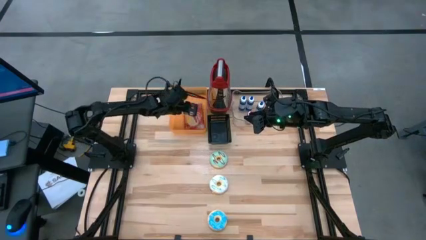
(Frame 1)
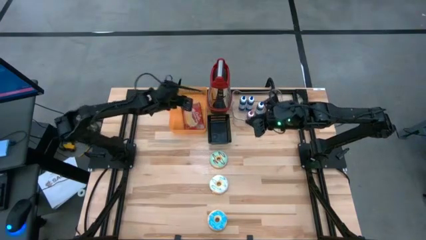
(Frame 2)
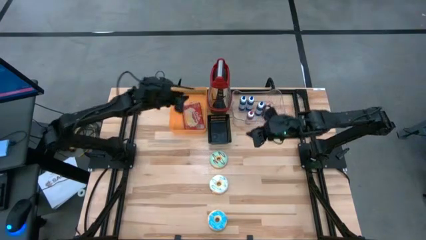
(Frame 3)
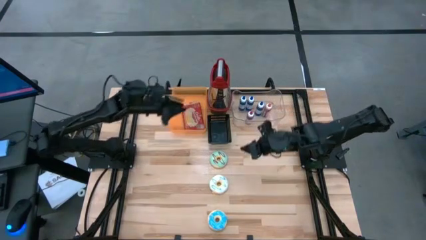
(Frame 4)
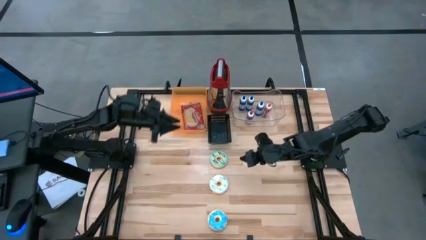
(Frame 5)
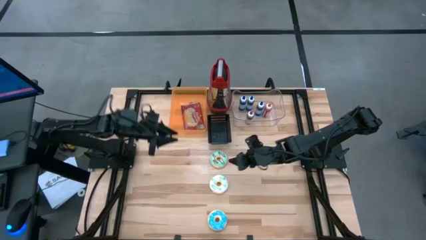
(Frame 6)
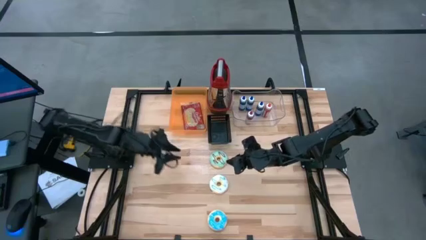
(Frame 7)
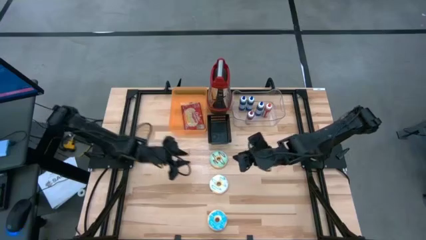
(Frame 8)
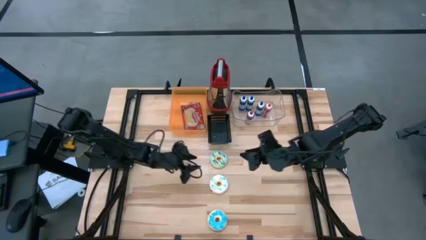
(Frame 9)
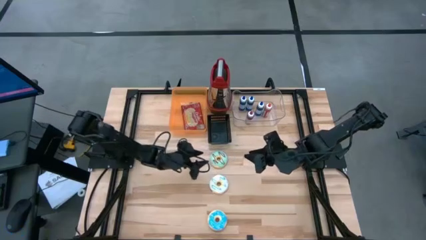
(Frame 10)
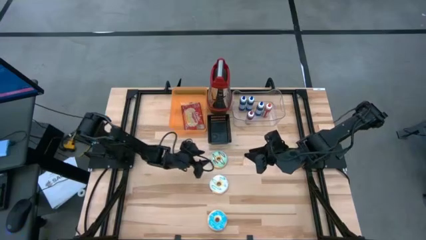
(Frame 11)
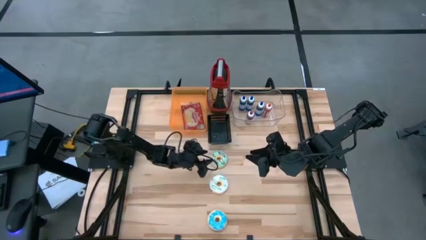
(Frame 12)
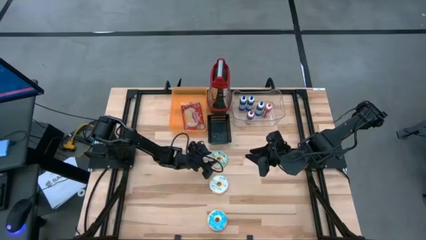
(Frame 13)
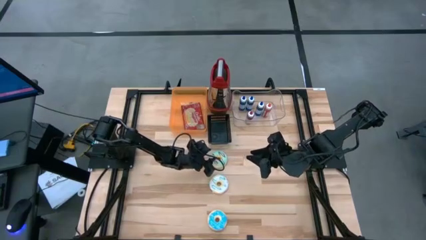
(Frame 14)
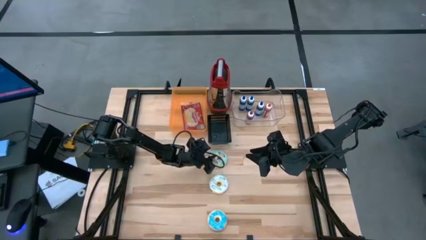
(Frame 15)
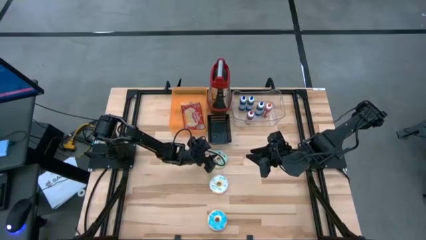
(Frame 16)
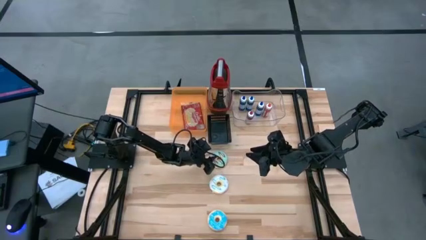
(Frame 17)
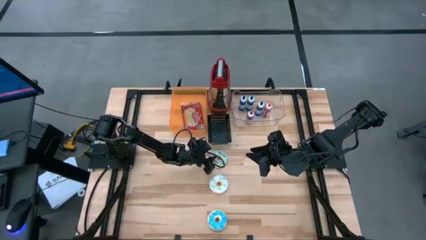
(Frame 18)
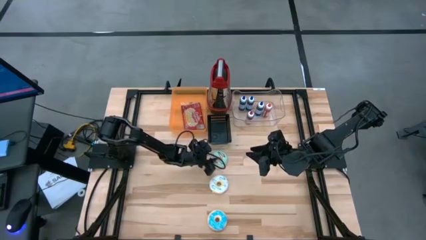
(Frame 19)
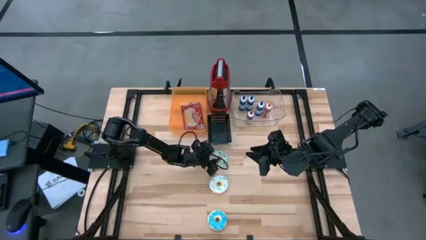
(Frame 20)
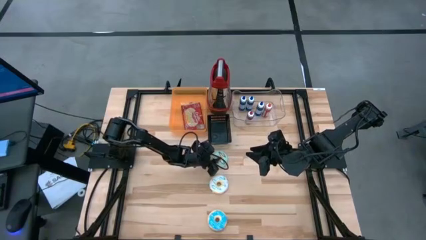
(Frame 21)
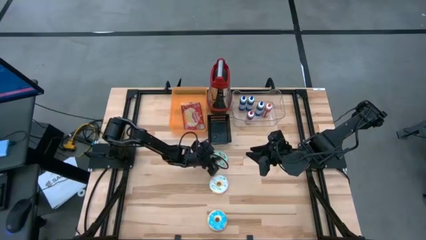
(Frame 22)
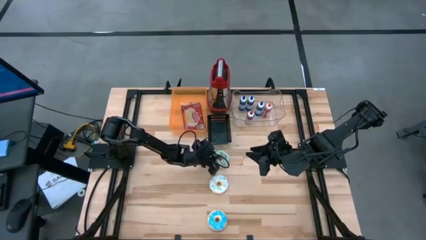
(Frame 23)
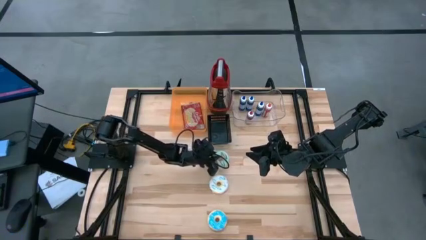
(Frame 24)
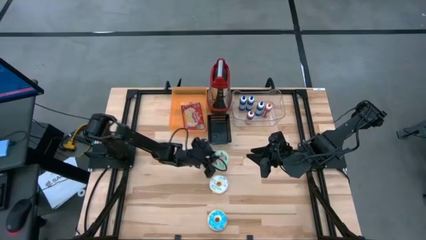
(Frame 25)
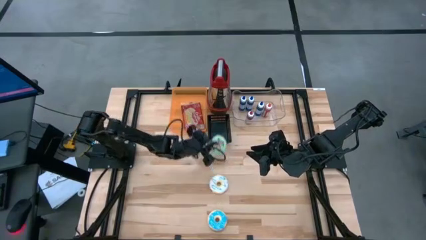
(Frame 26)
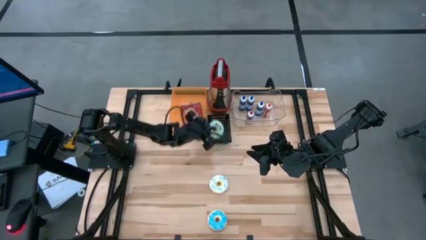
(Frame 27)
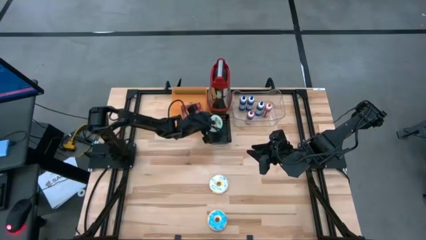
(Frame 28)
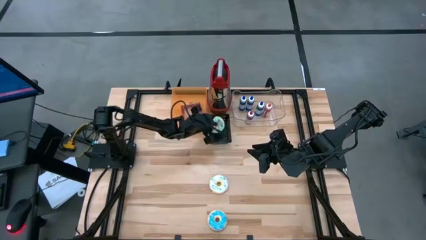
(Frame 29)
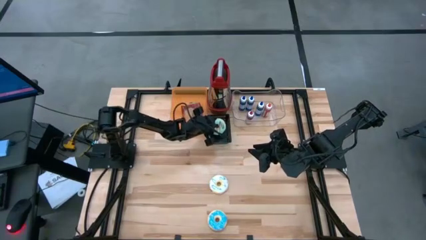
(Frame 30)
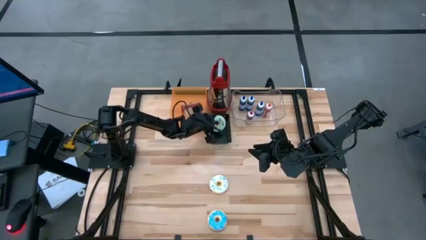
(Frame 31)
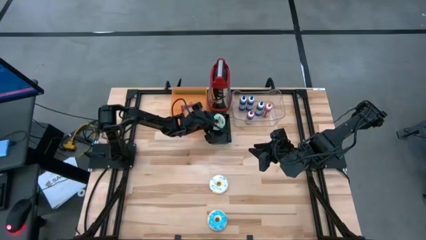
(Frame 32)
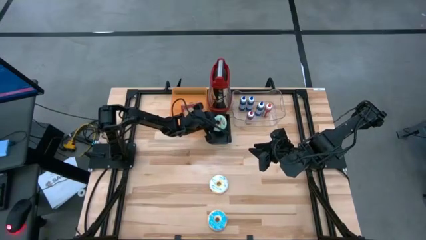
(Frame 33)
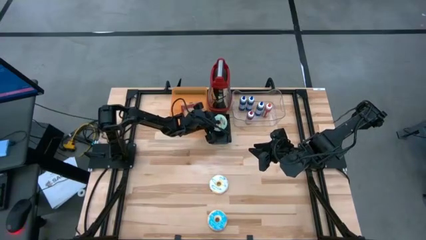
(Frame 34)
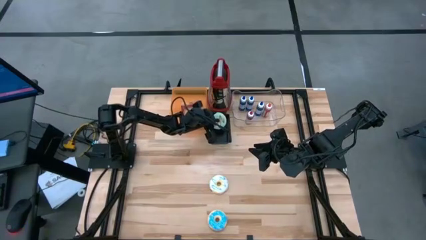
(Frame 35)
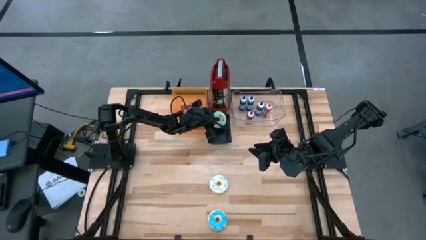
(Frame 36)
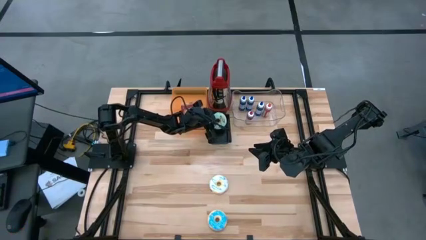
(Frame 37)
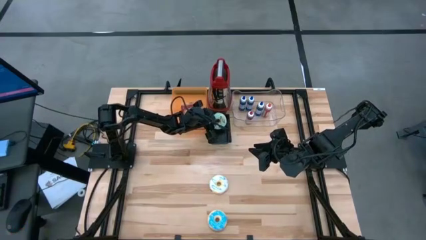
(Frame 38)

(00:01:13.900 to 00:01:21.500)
Put the light green donut into the black bin

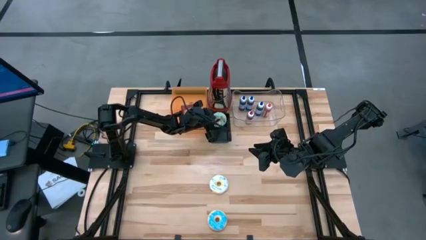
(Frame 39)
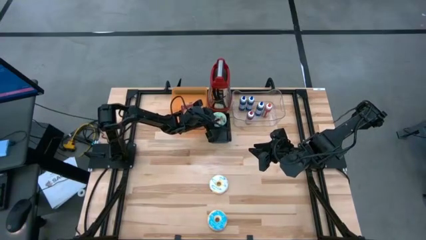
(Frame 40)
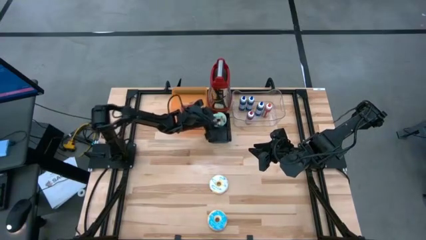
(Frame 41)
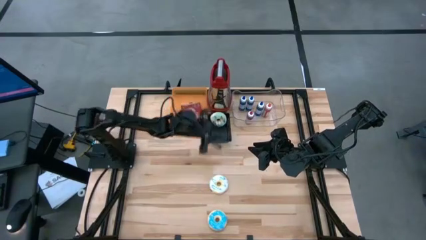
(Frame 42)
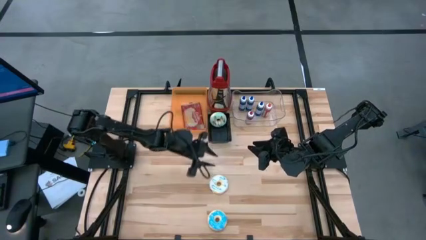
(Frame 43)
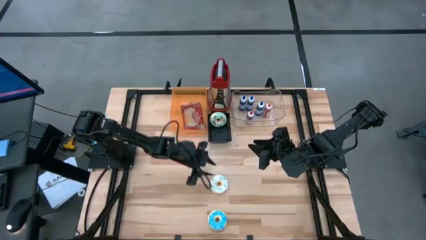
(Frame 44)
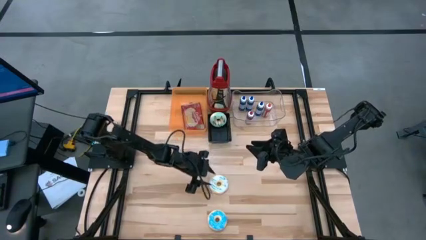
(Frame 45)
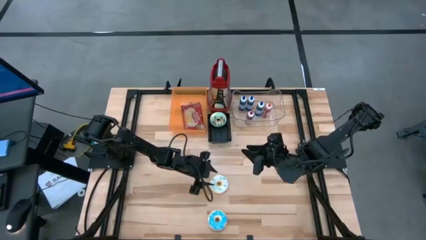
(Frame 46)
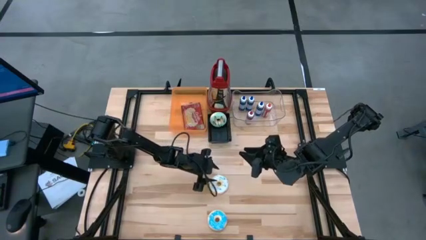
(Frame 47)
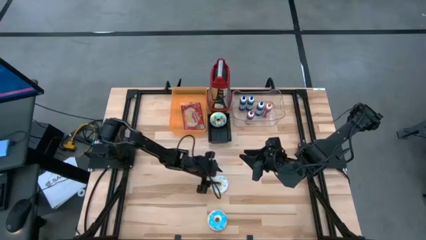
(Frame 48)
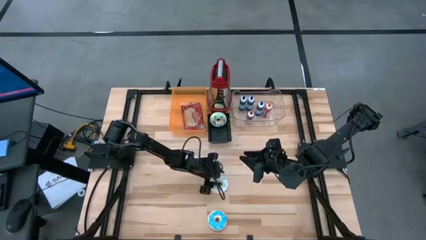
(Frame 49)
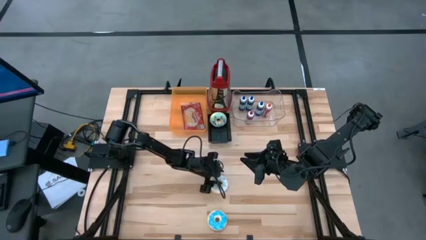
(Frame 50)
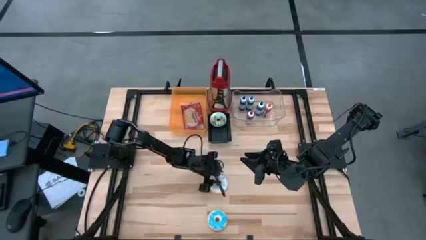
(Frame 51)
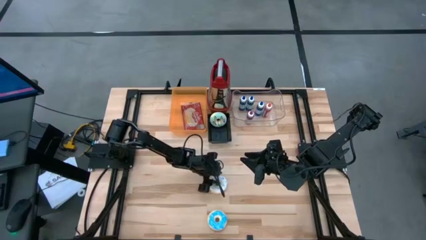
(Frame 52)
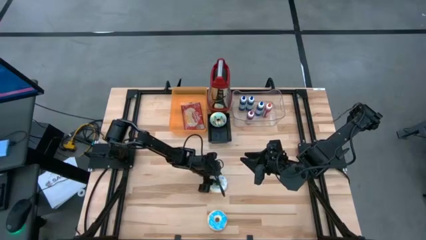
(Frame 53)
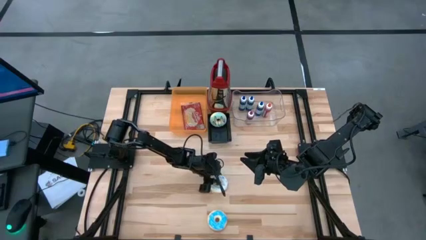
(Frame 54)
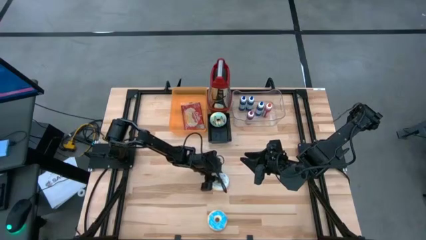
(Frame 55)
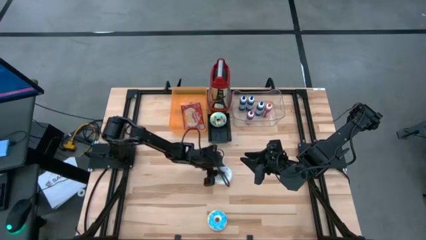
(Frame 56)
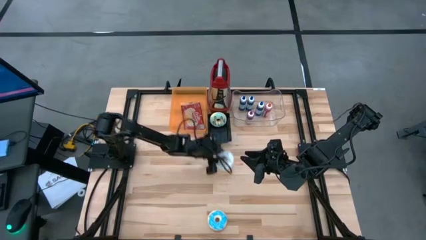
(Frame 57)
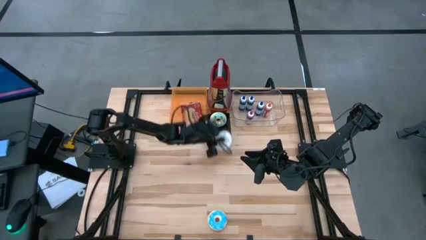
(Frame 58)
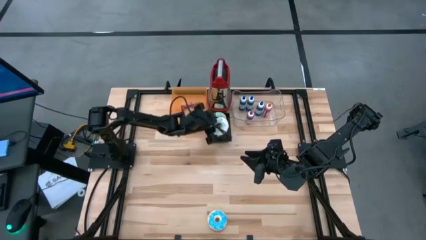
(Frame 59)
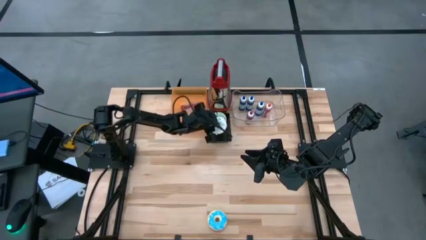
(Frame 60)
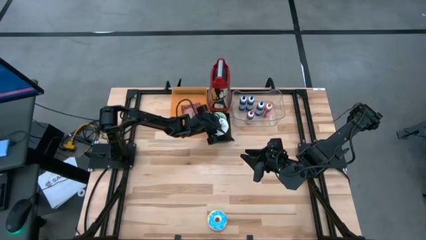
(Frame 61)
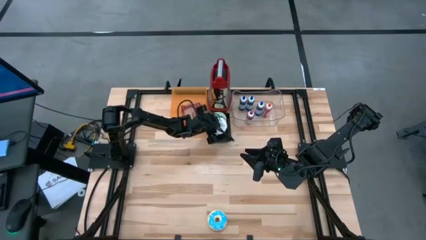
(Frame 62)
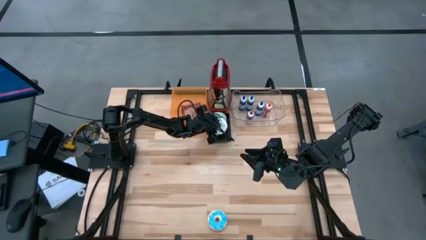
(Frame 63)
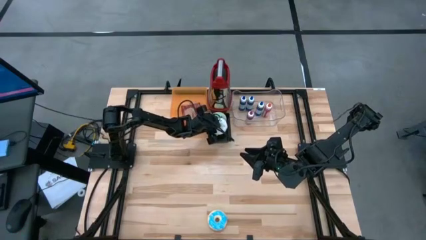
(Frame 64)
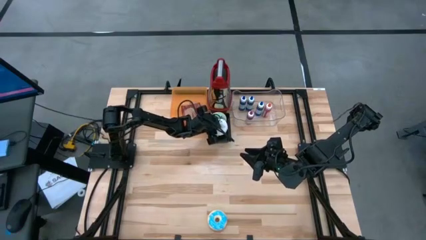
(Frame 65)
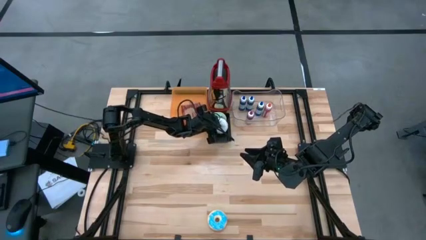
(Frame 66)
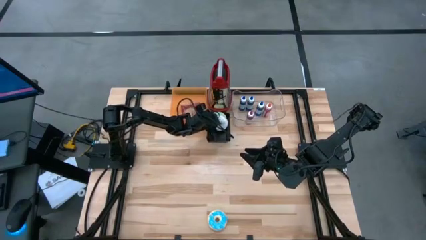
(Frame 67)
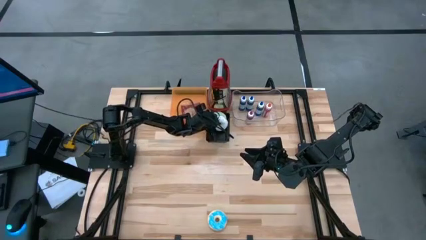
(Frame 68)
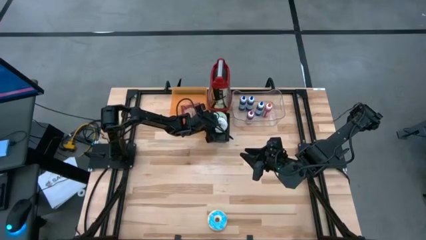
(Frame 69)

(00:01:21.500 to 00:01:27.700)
Put the white donut into the black bin

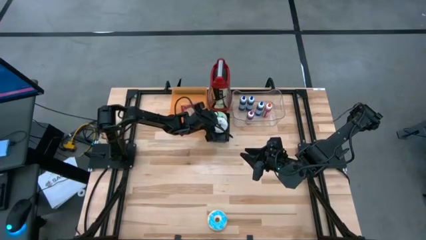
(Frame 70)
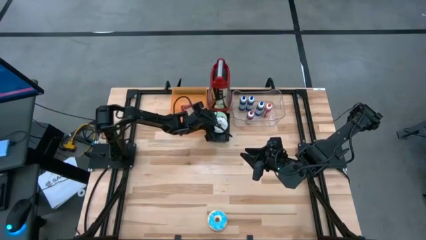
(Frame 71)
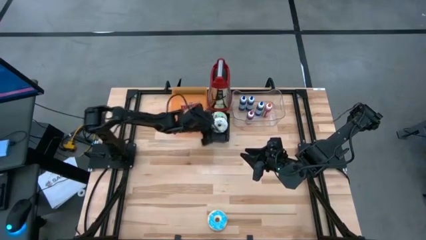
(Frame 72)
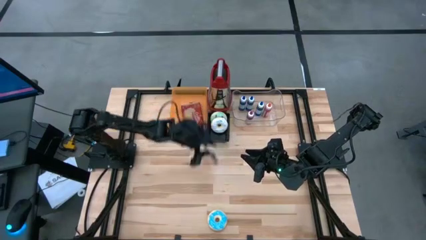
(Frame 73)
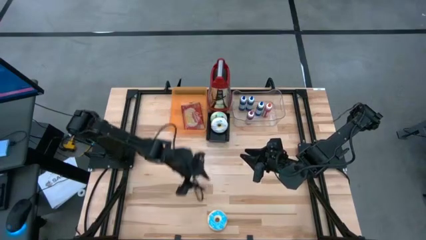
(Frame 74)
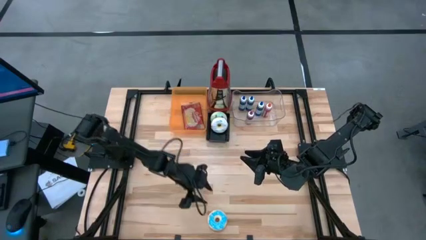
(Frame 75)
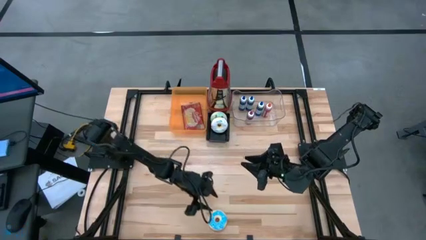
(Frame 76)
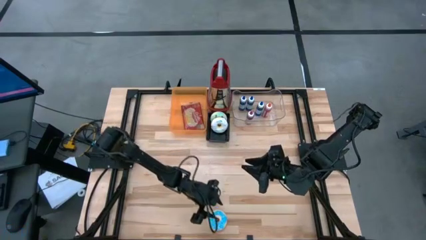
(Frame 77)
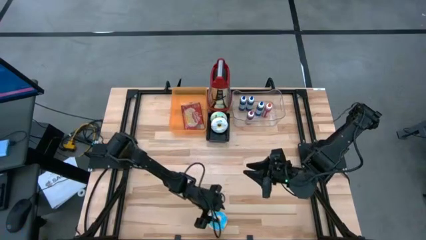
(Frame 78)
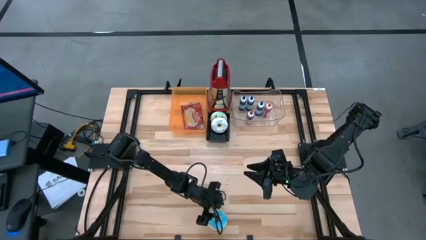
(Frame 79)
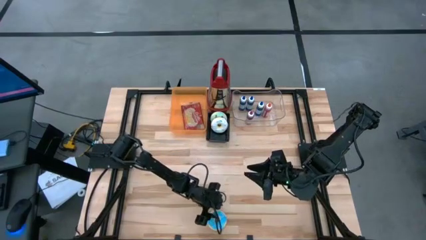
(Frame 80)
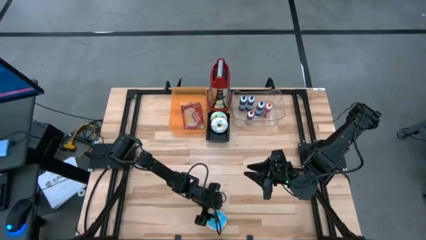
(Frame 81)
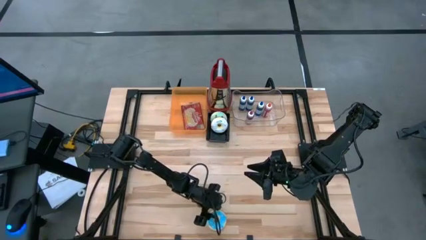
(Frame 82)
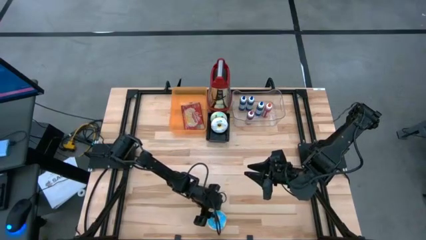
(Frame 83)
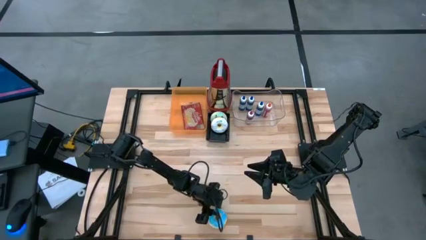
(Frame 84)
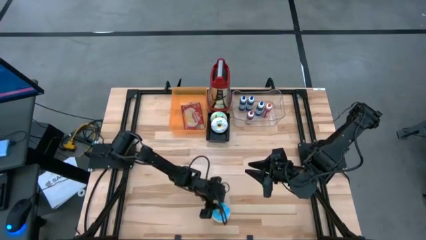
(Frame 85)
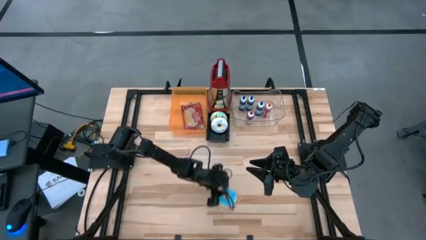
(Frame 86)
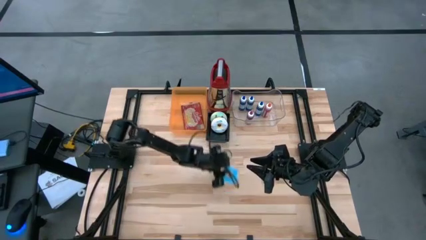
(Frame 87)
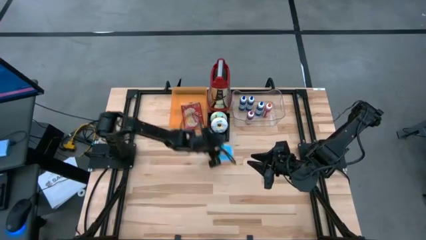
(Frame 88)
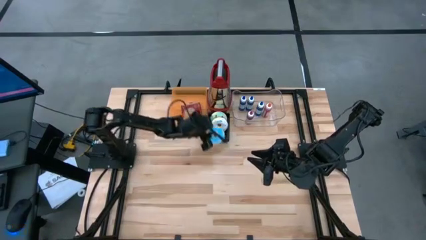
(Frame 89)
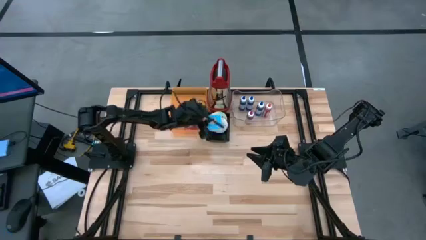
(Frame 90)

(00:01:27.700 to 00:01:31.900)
Put the blue donut into the black bin
